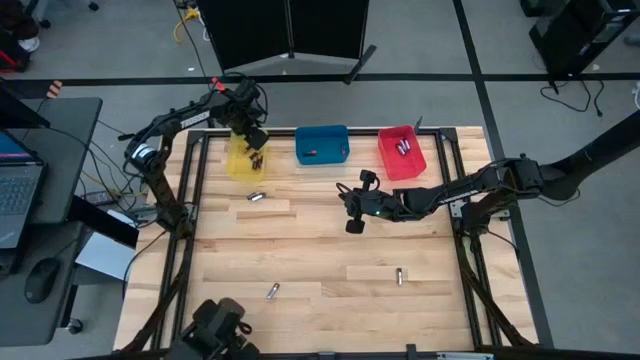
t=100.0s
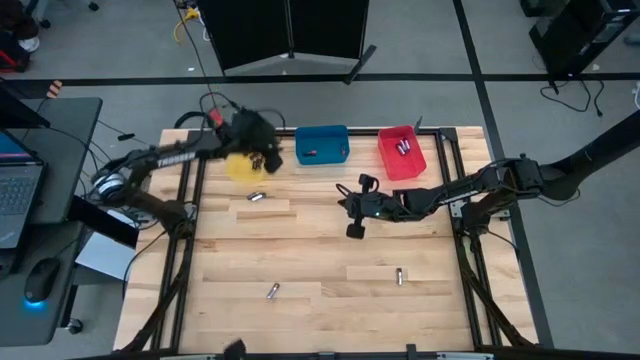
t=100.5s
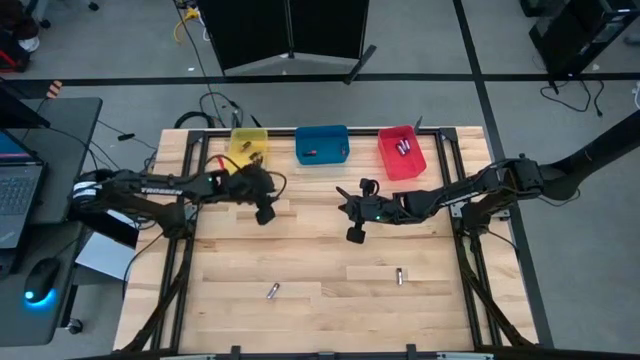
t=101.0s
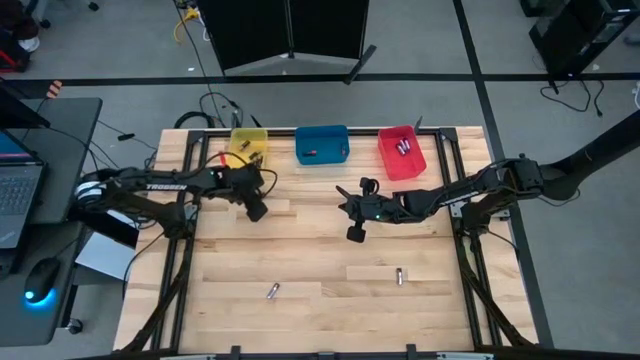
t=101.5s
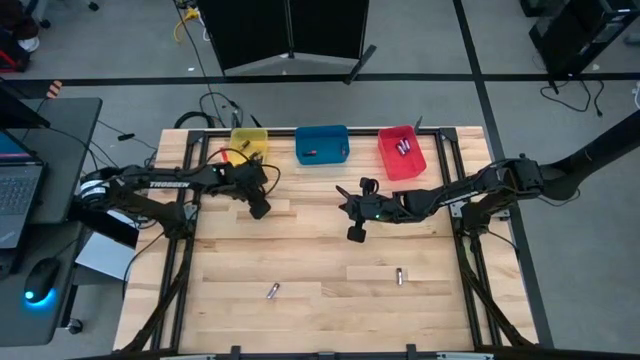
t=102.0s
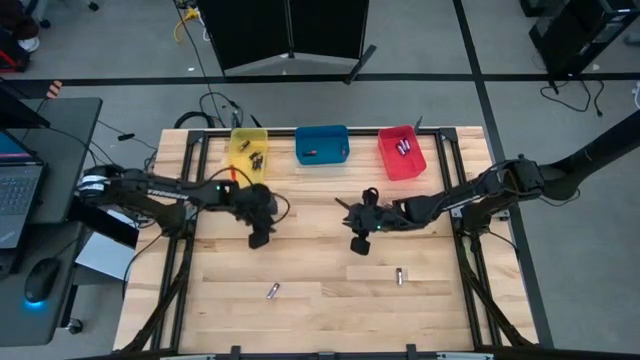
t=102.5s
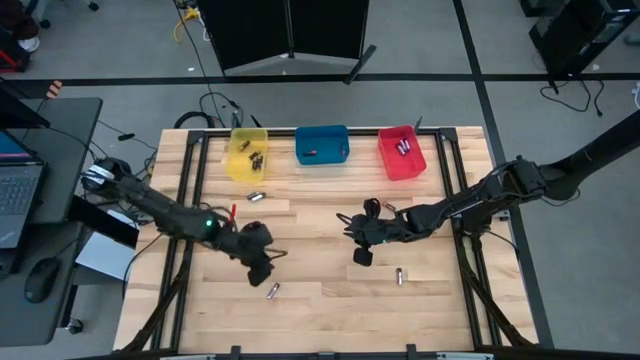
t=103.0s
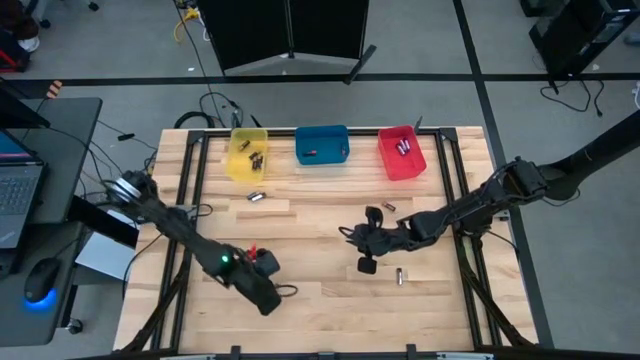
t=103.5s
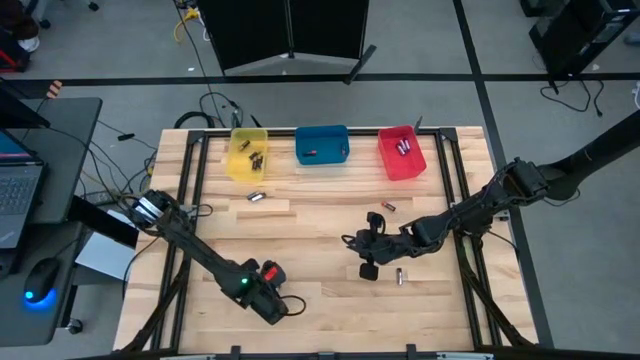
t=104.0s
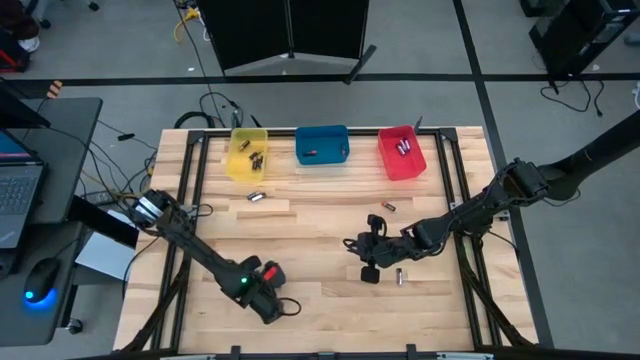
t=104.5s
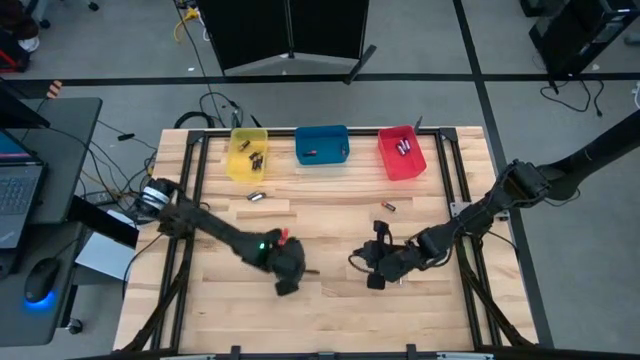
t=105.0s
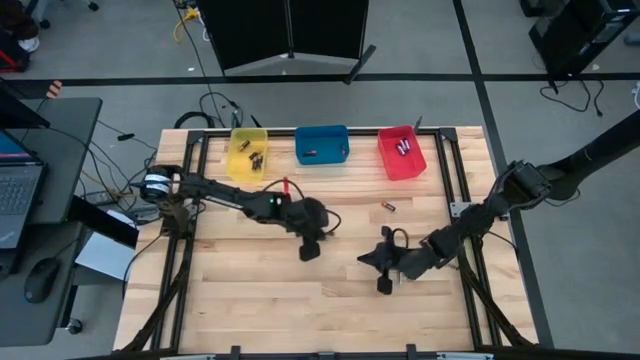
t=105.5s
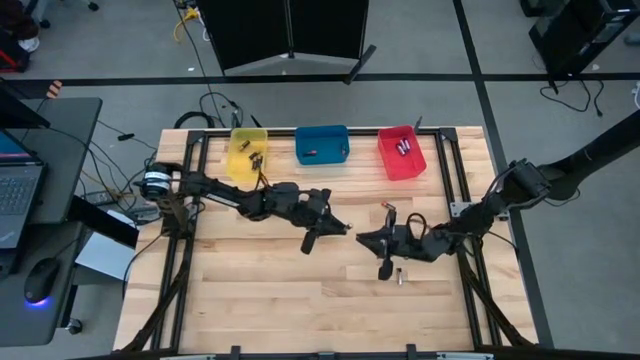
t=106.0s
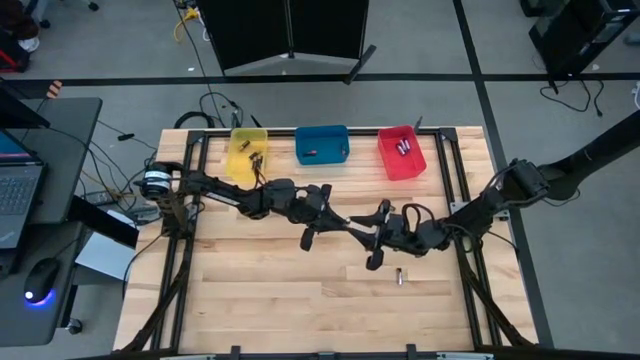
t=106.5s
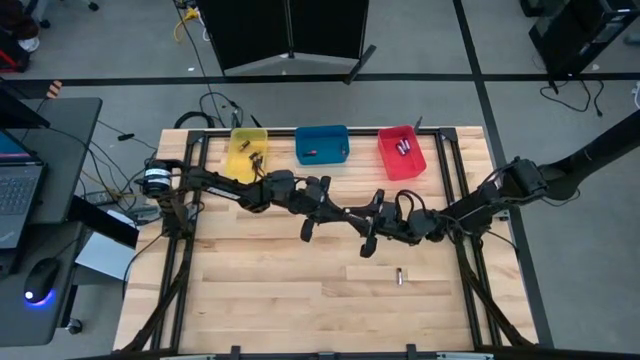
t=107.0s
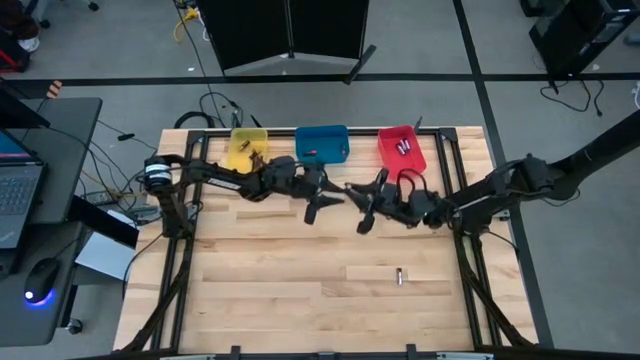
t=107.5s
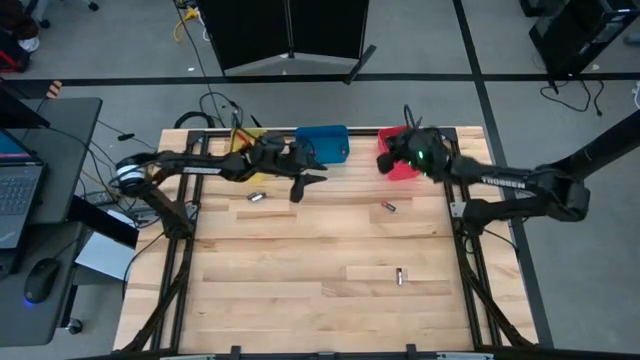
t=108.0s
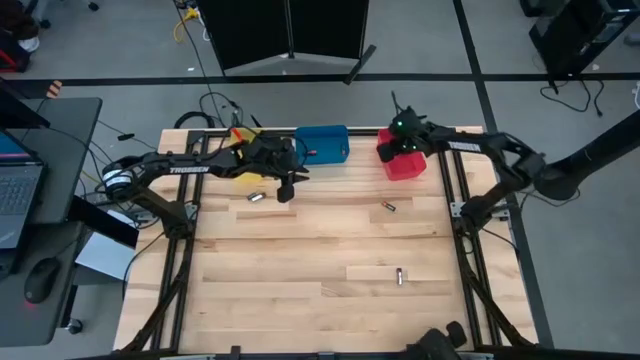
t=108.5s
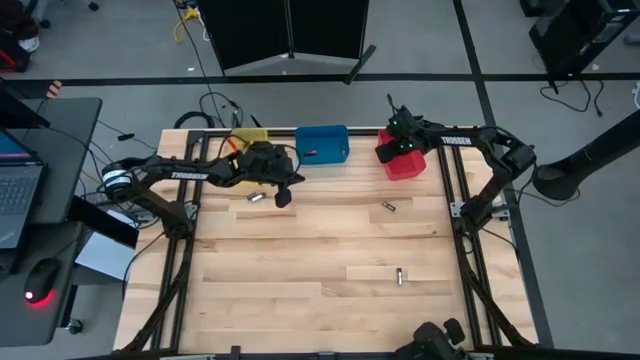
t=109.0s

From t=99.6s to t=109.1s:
Task: Sort batteries
Put the silver battery into the pink bin

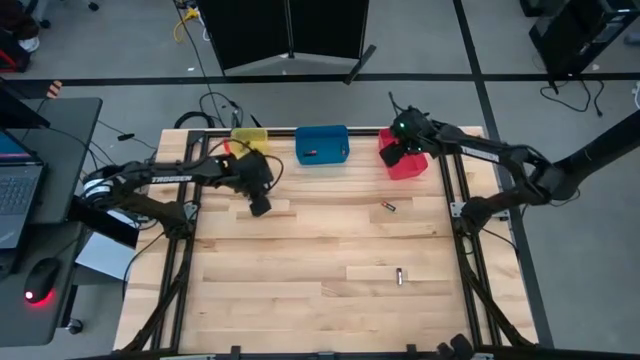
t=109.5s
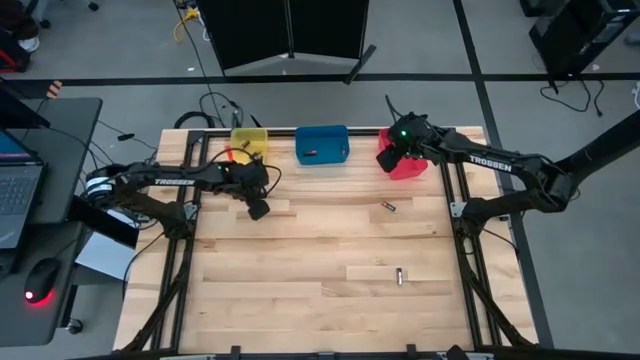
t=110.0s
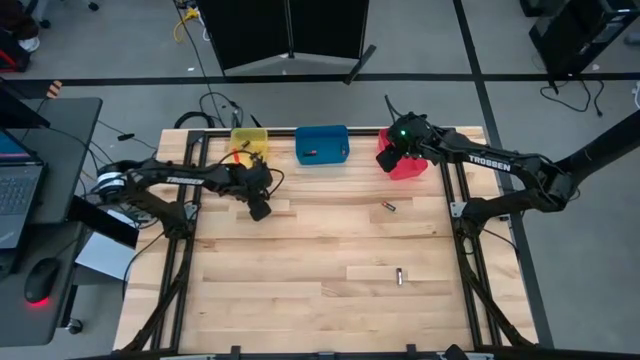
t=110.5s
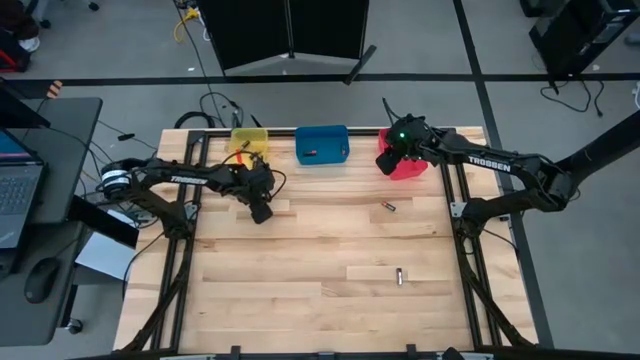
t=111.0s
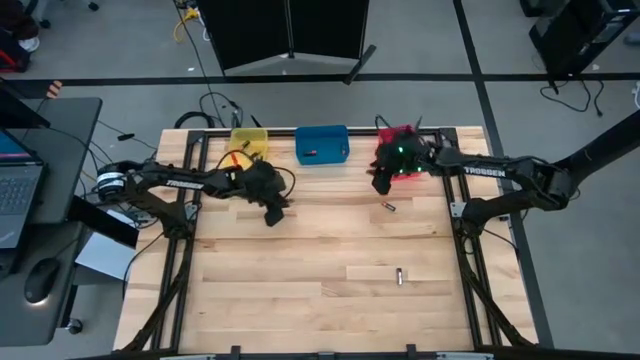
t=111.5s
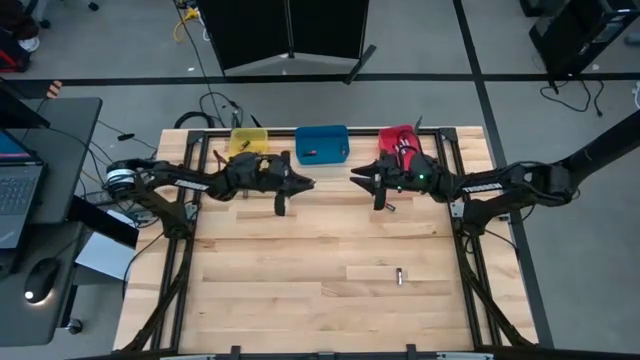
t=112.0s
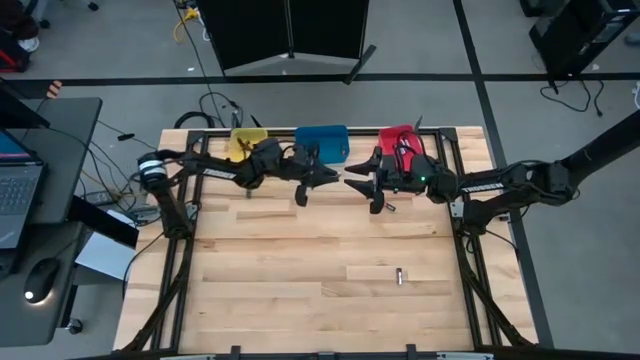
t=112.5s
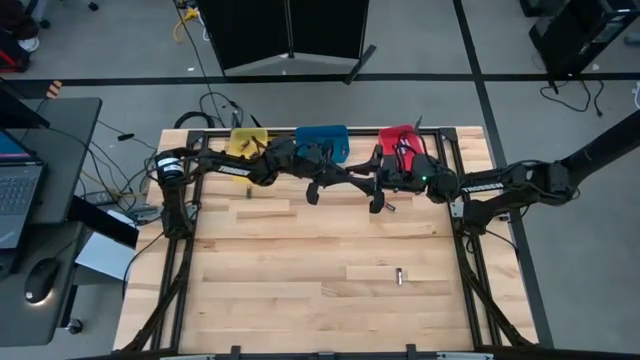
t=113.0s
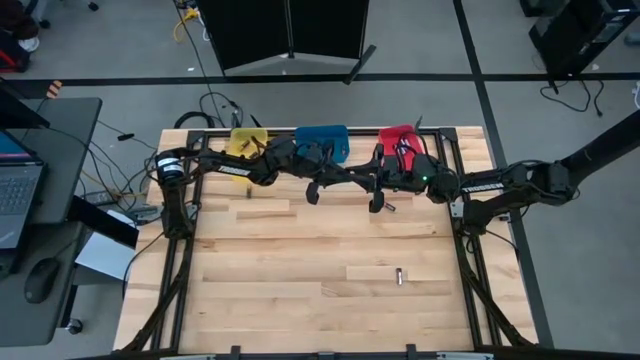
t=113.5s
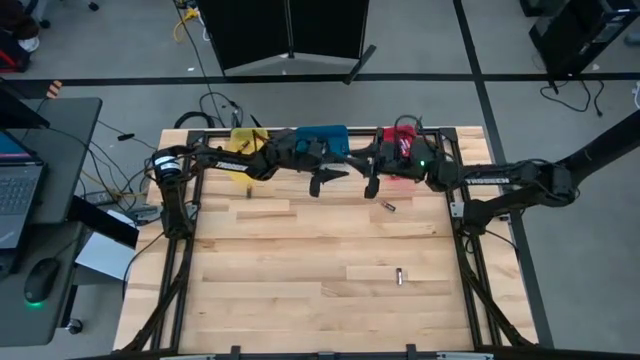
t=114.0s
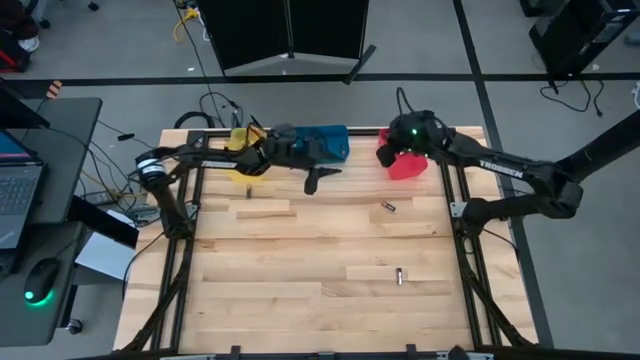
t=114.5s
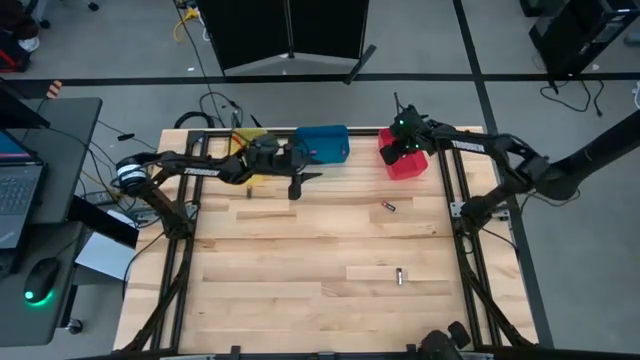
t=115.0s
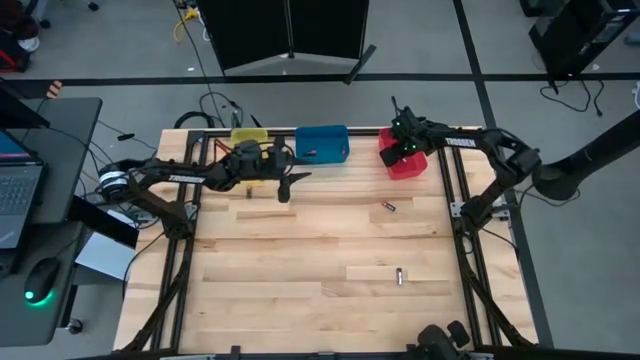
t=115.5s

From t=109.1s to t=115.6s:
Put the silver battery into the pink bin

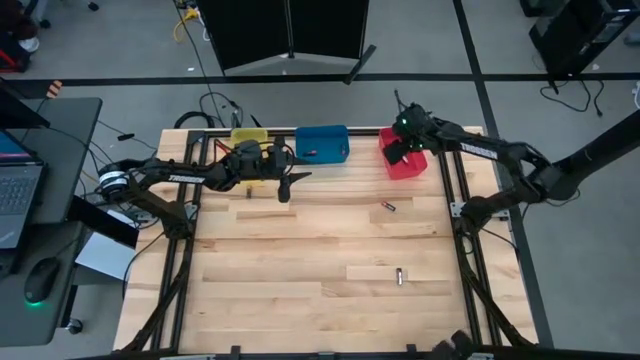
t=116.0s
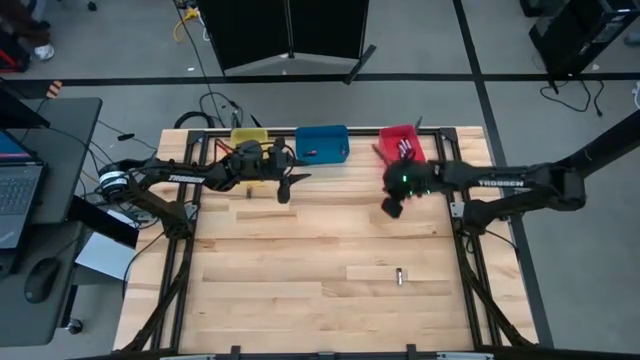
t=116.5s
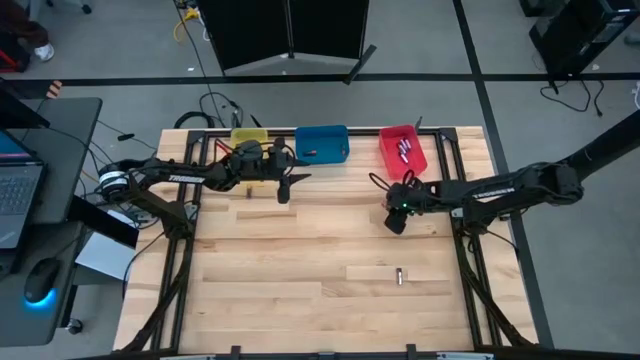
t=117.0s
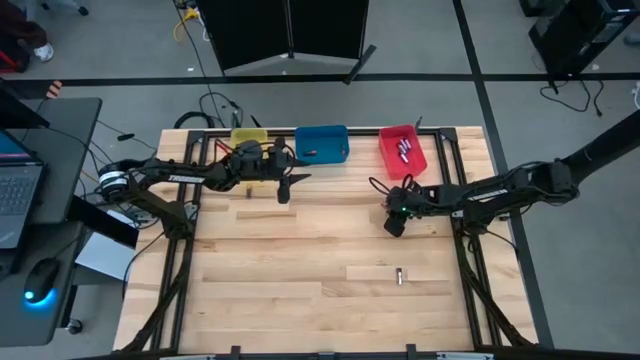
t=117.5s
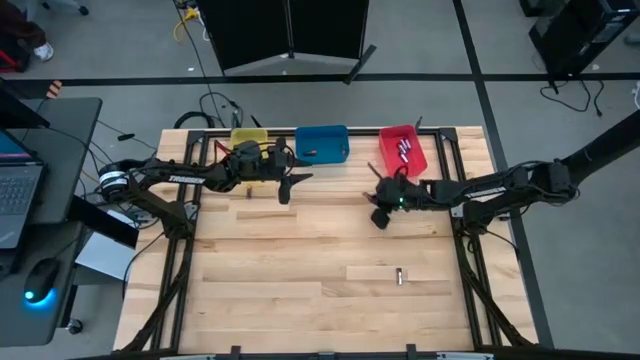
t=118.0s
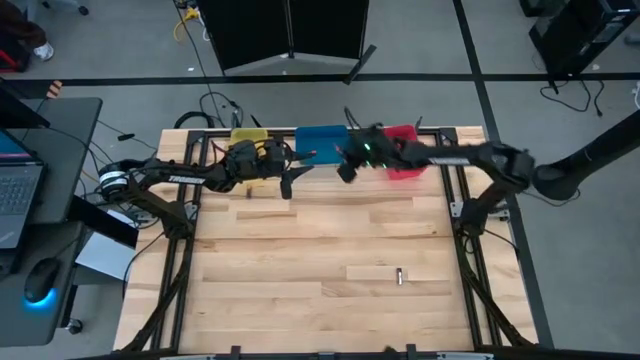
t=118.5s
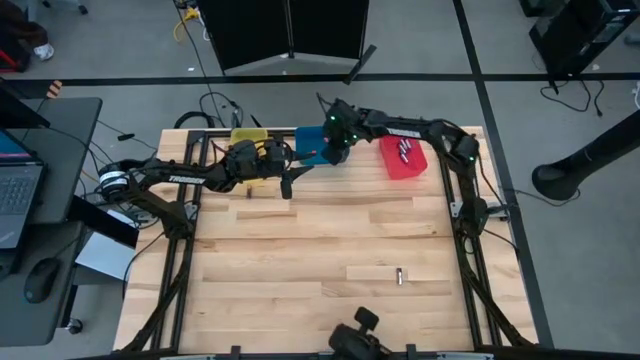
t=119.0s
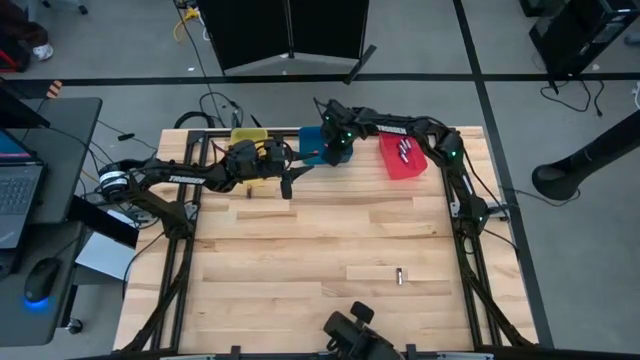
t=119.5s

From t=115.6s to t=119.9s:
Put the black orange battery into the blue bin
